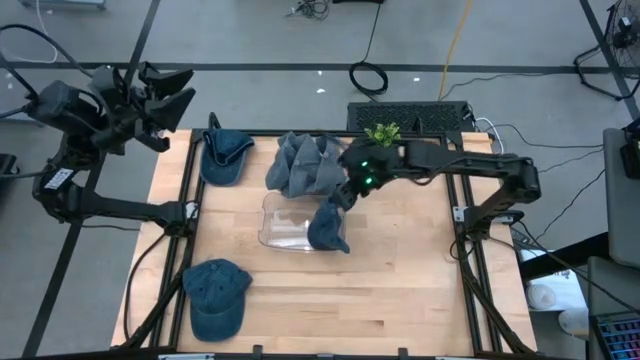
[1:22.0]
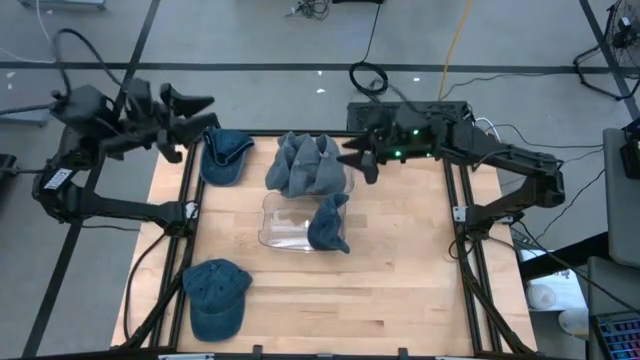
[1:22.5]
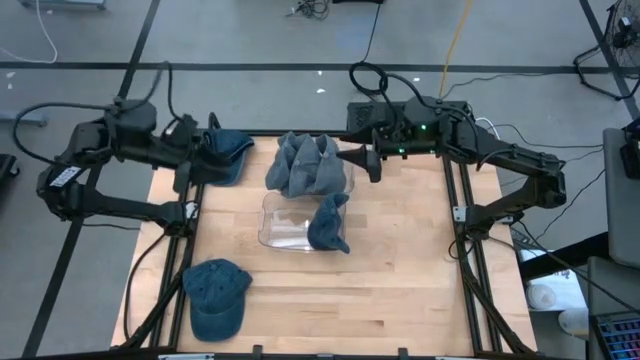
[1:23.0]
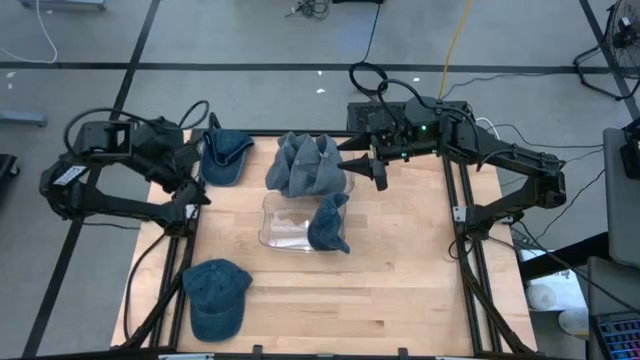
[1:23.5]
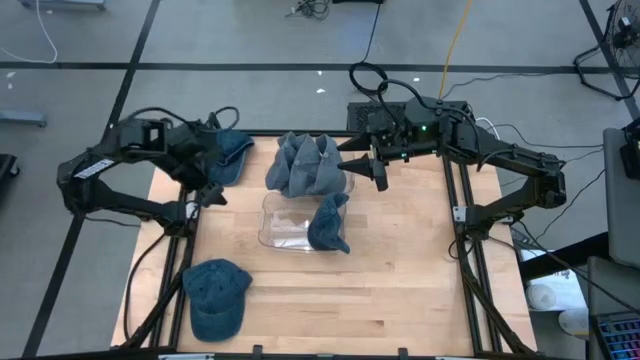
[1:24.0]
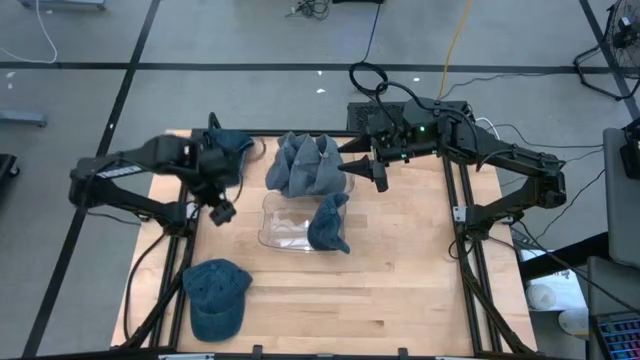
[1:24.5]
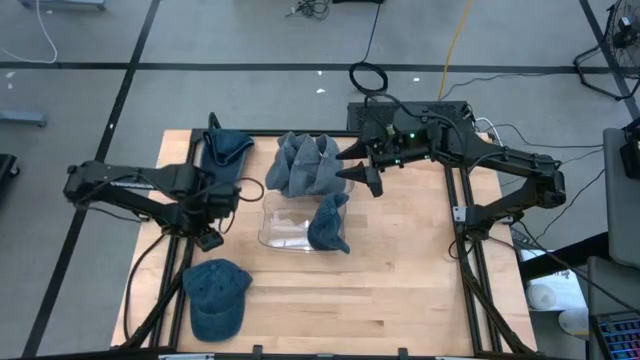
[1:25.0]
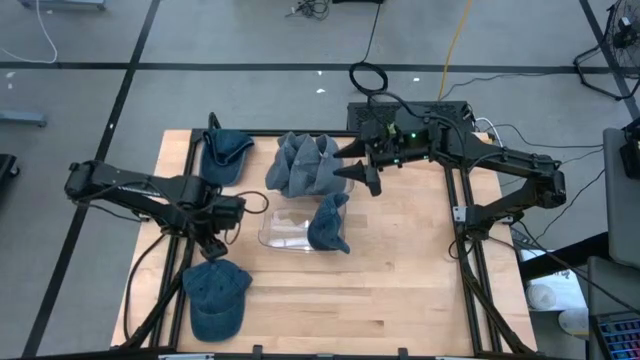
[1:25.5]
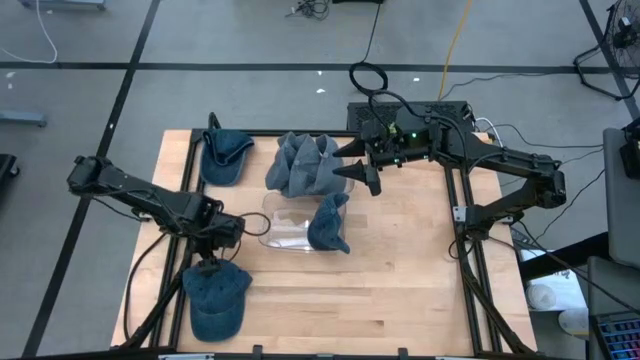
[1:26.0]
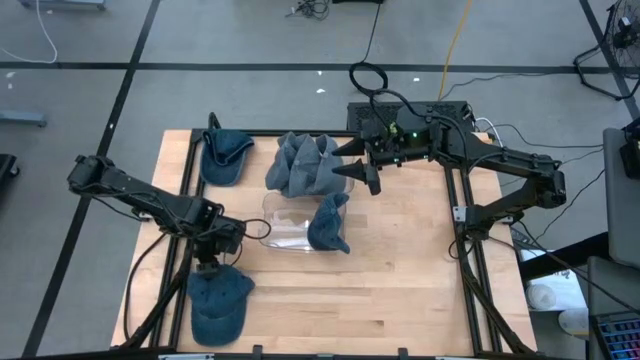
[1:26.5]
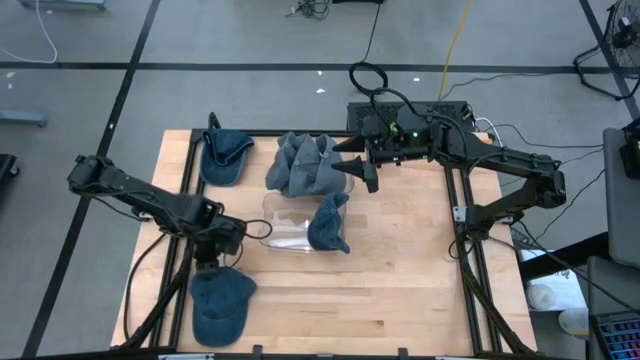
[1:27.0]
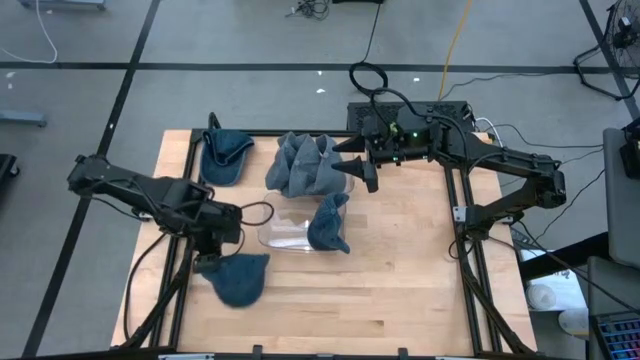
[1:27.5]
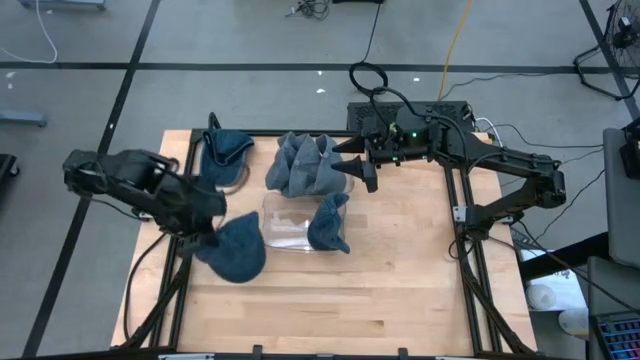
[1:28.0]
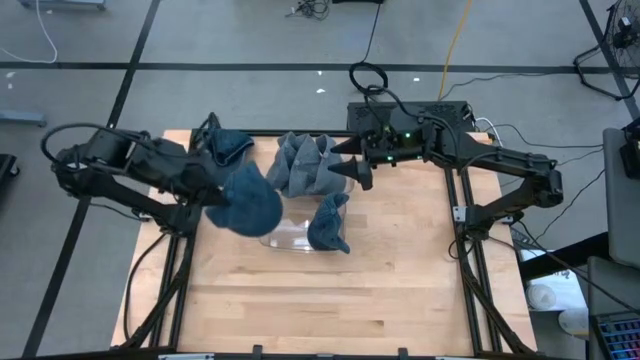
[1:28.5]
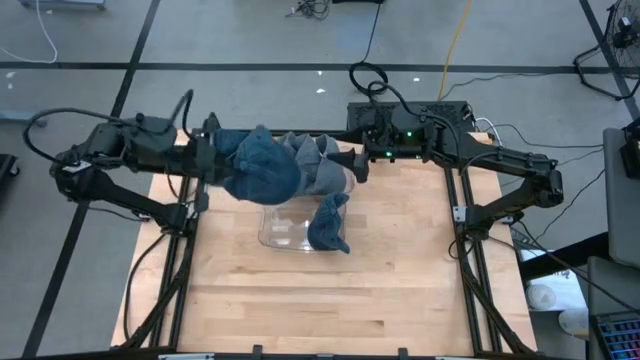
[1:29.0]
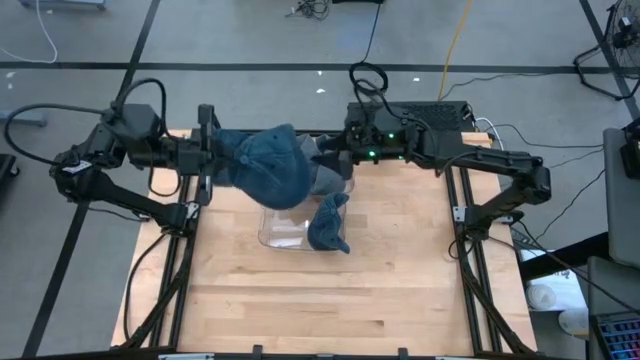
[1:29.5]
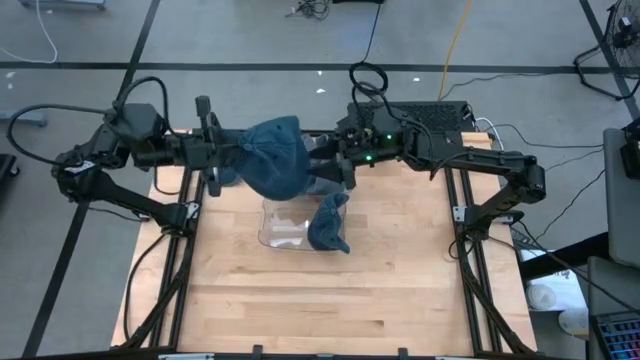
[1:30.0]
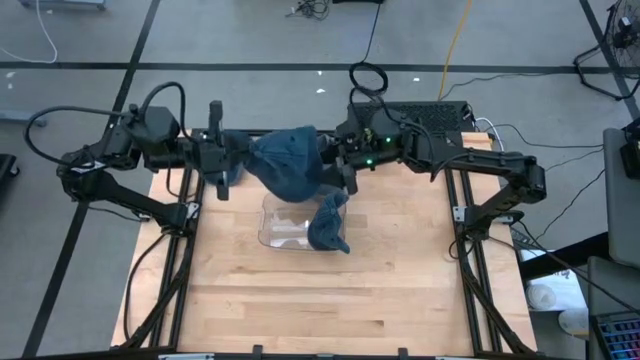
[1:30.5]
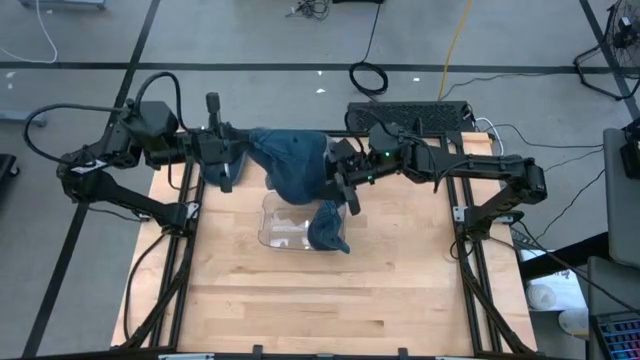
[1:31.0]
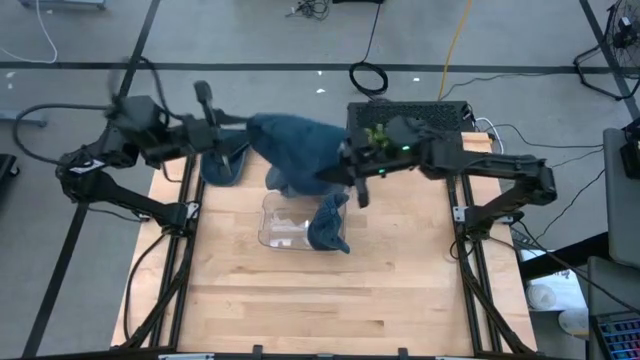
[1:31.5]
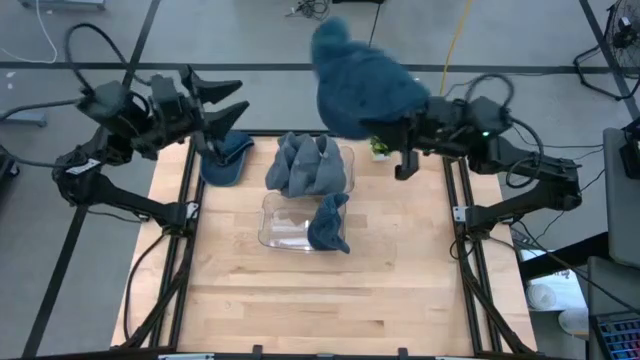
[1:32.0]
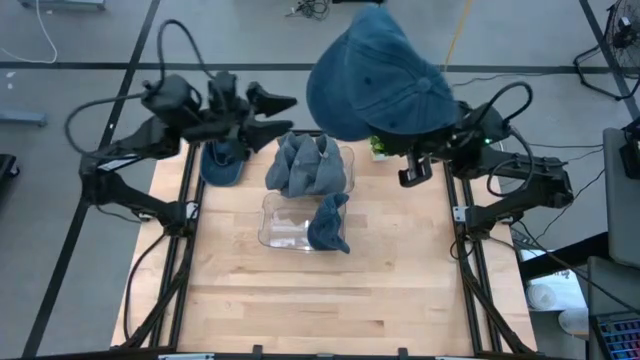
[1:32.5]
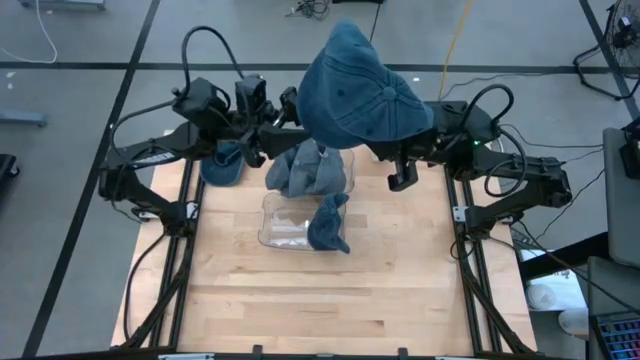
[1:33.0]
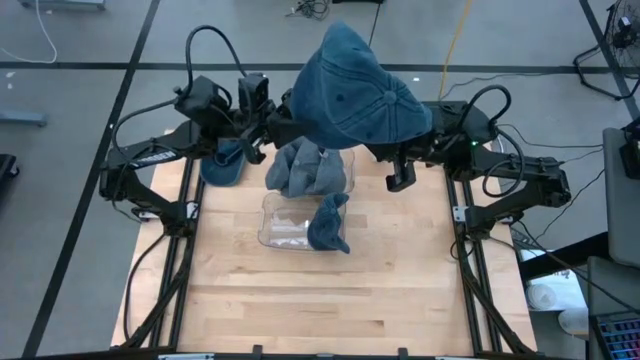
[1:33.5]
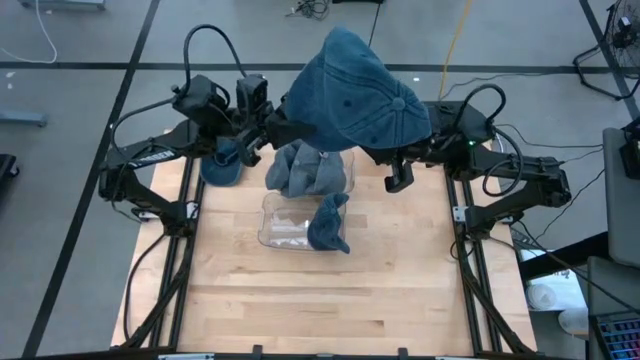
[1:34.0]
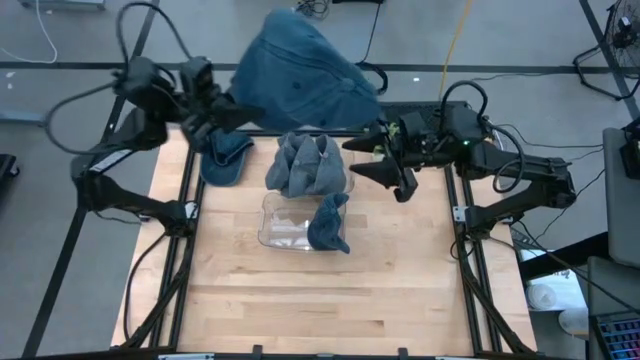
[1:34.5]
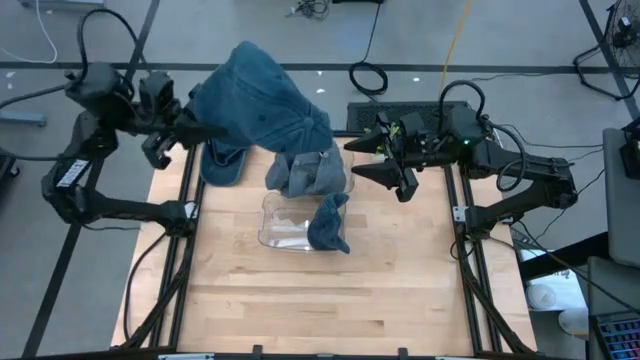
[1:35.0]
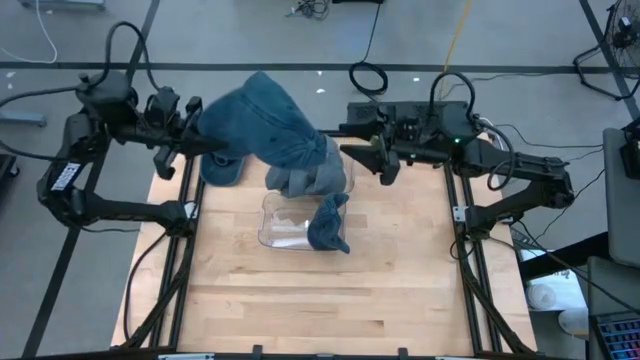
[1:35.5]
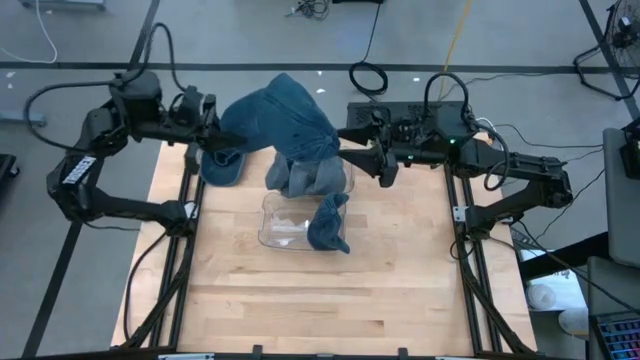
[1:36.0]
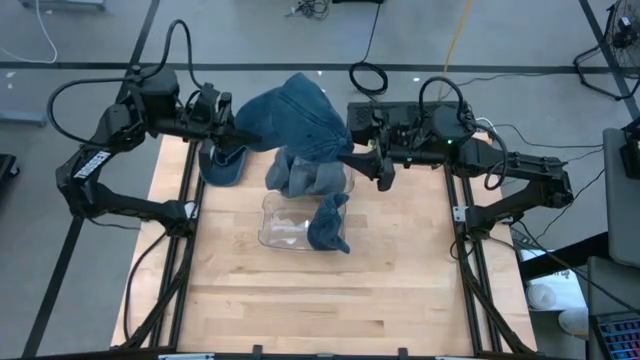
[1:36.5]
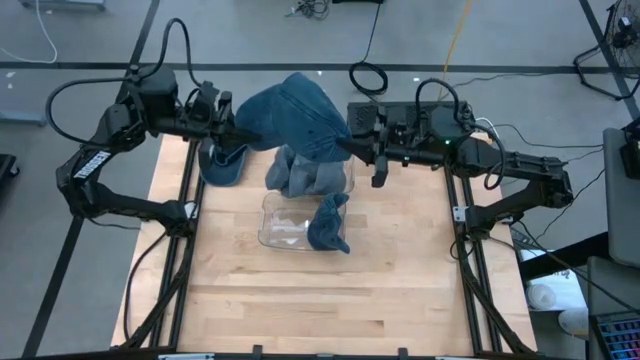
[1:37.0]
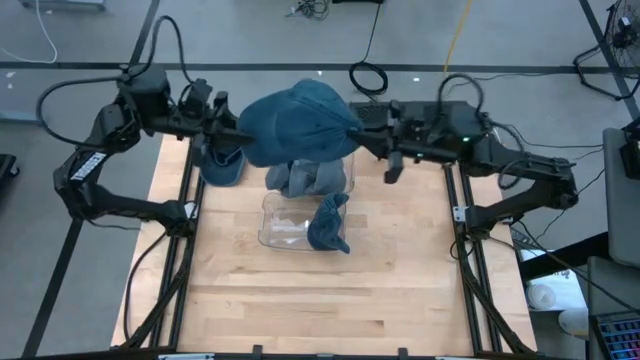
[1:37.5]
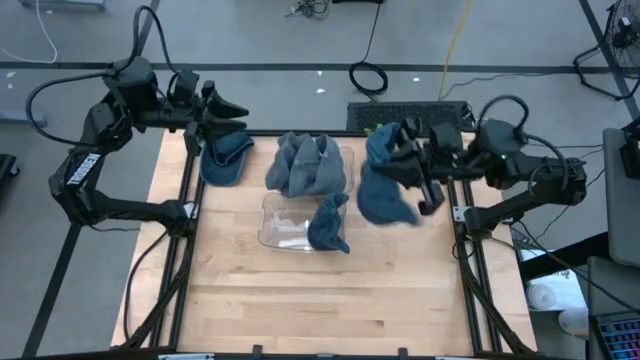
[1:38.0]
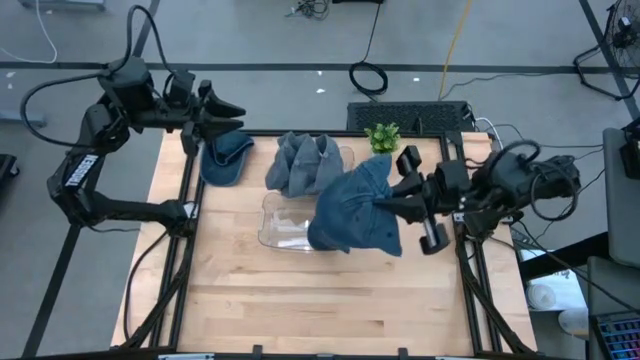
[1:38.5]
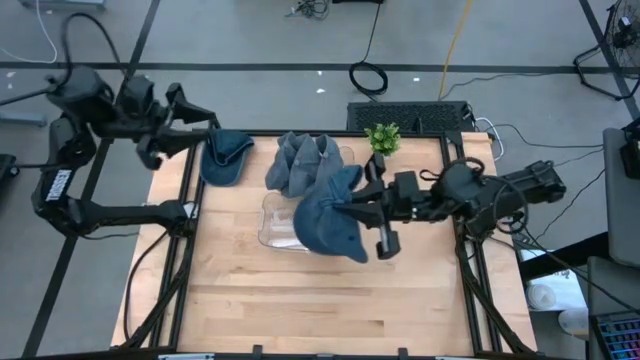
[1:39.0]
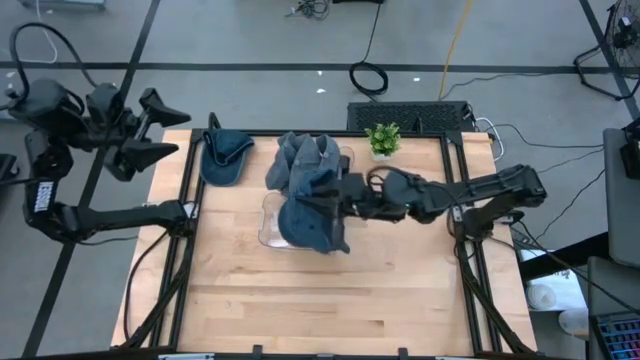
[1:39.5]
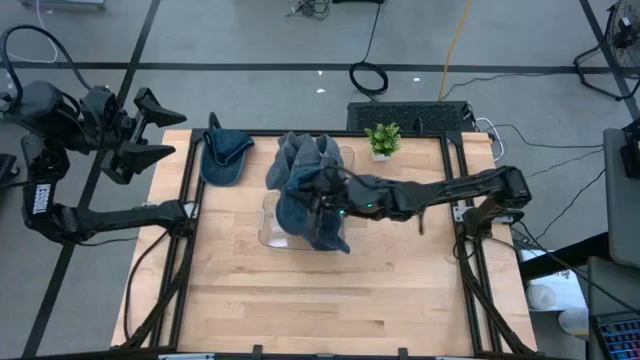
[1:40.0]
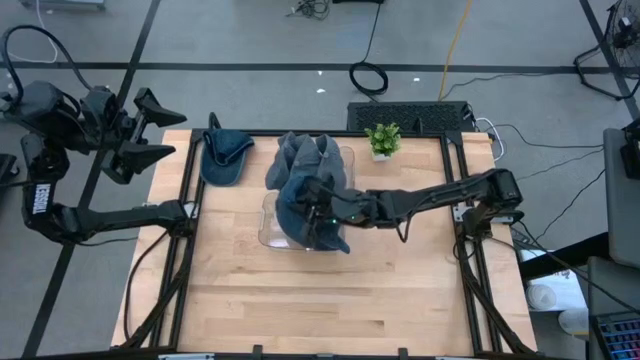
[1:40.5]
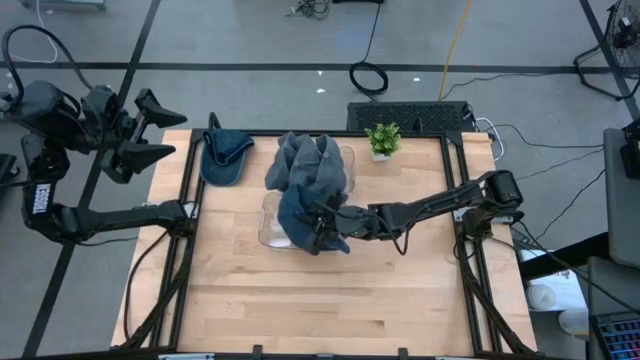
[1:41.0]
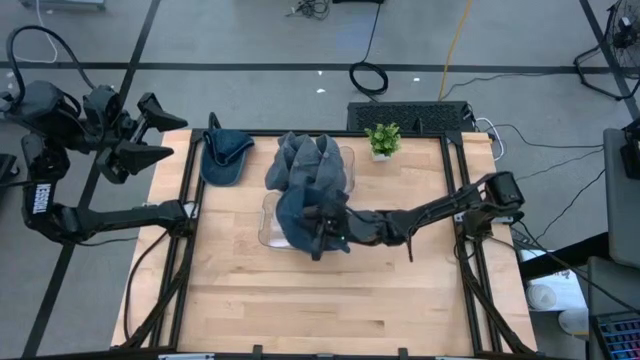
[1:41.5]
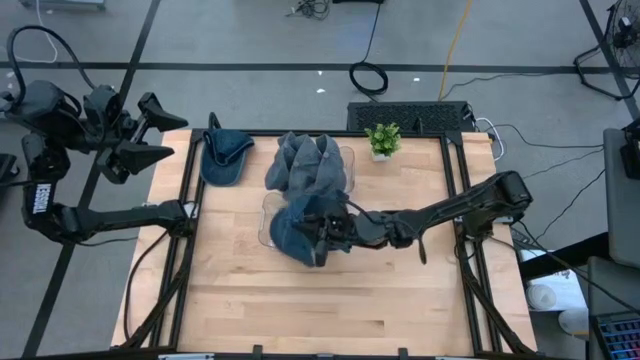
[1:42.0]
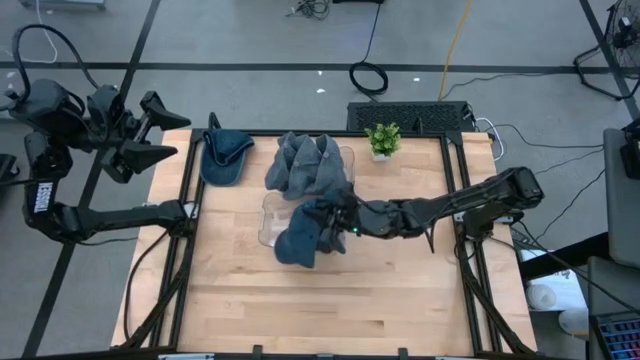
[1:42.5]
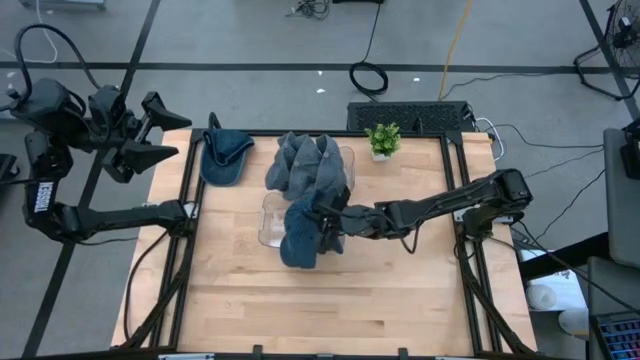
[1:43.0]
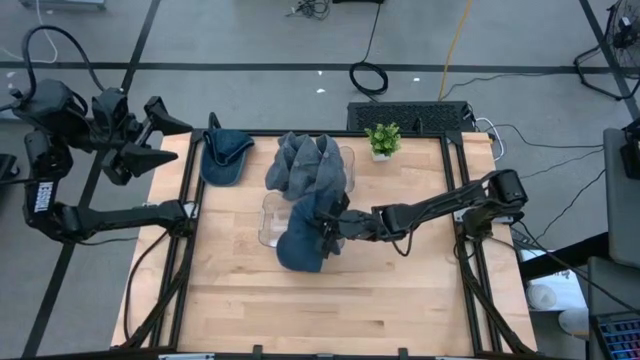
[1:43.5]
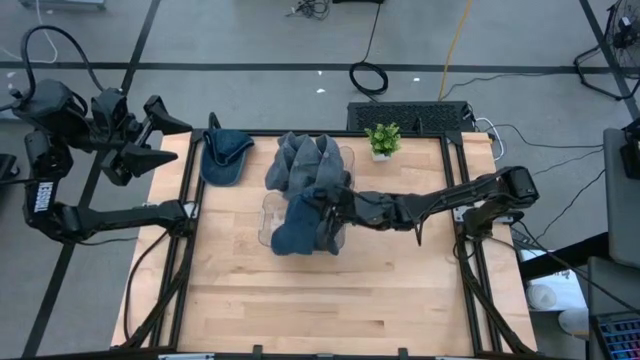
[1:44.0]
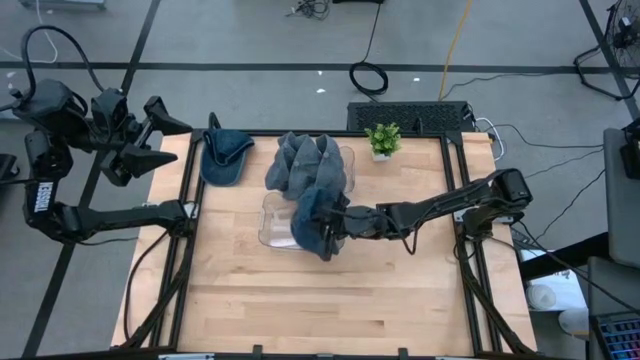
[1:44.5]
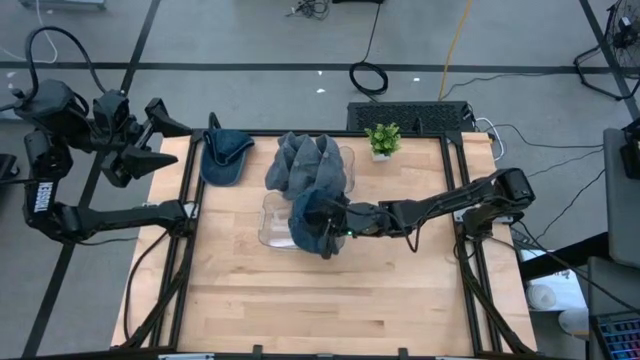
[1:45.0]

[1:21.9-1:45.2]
Task: Pick & Place hat
Put the bottom blue cap into the bottom transparent bin
